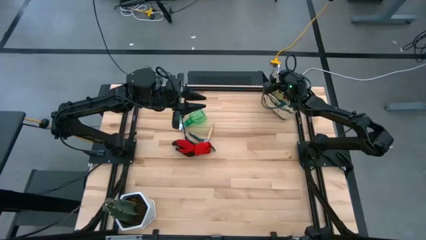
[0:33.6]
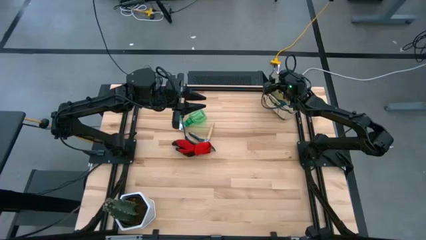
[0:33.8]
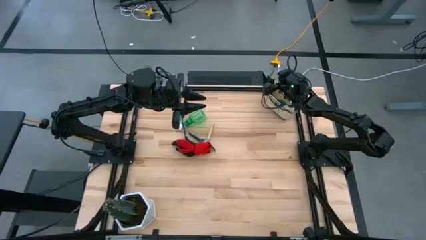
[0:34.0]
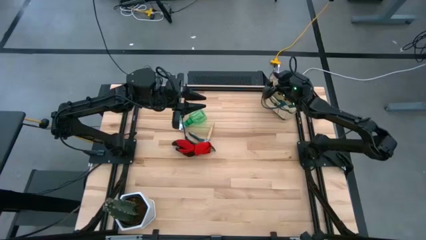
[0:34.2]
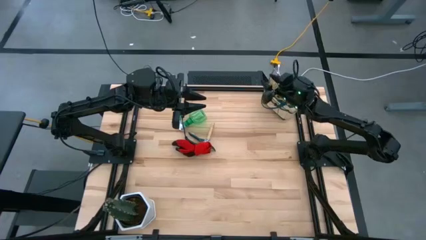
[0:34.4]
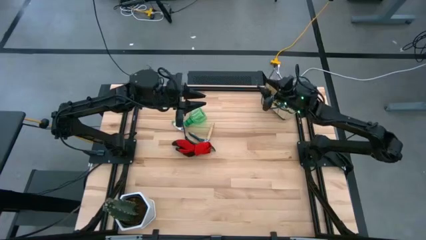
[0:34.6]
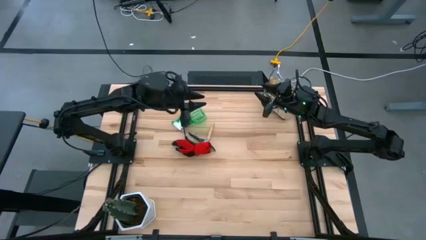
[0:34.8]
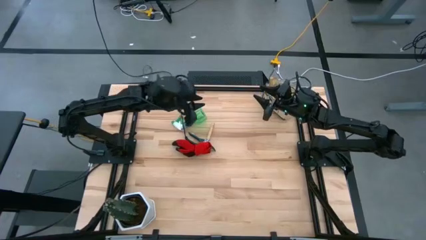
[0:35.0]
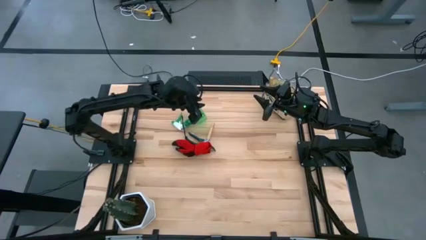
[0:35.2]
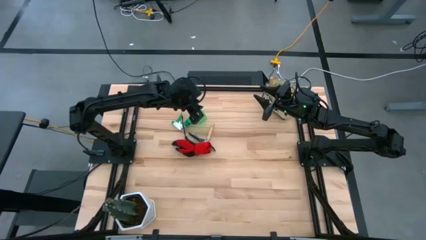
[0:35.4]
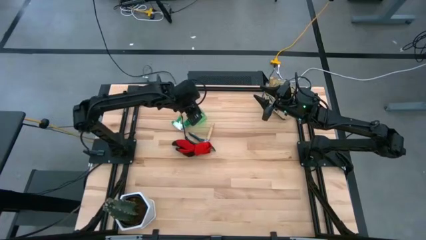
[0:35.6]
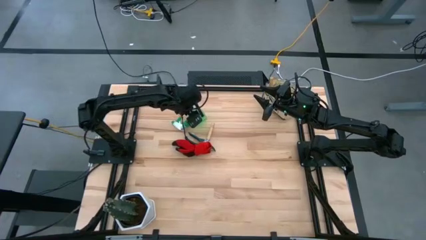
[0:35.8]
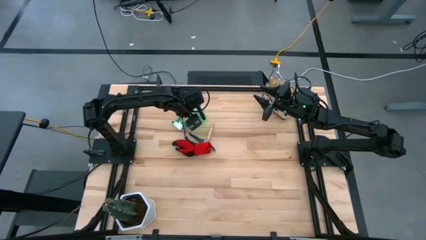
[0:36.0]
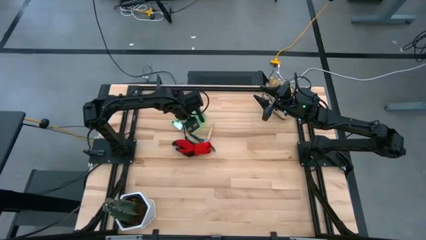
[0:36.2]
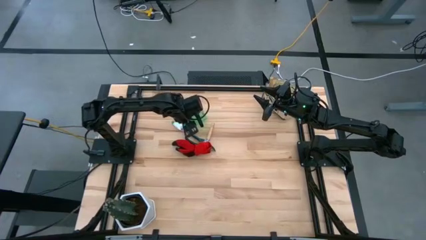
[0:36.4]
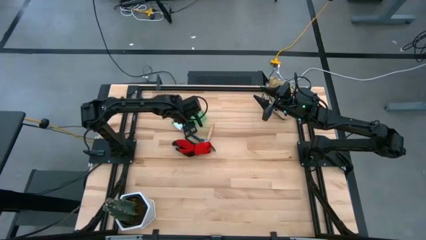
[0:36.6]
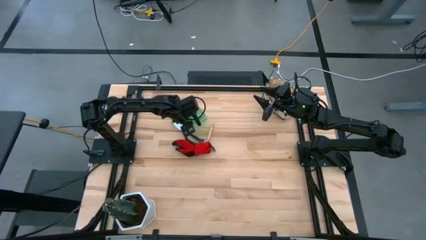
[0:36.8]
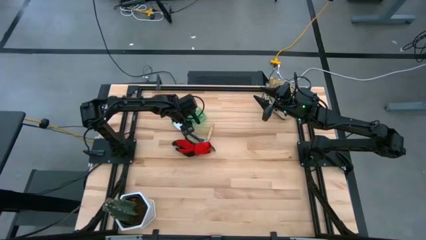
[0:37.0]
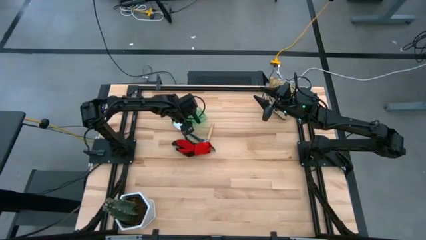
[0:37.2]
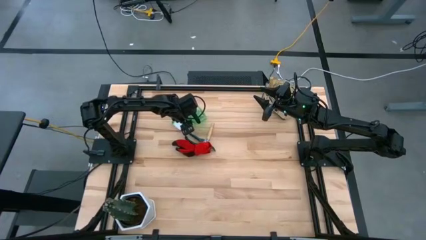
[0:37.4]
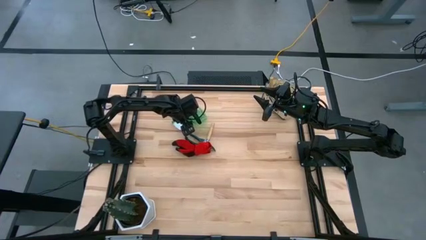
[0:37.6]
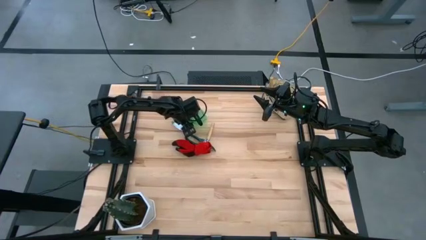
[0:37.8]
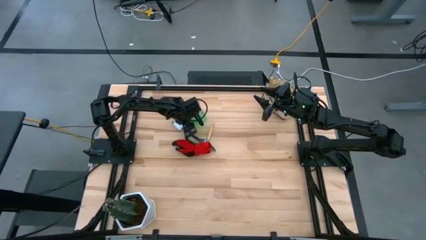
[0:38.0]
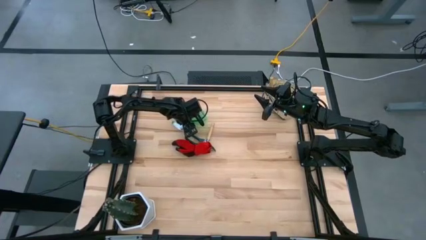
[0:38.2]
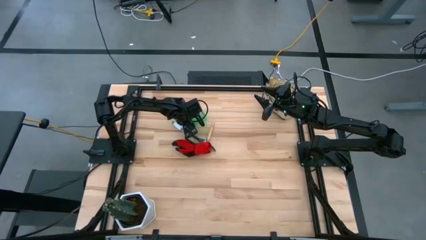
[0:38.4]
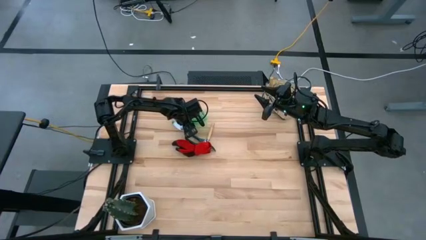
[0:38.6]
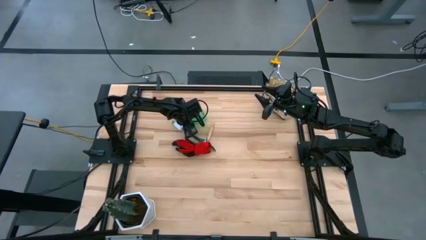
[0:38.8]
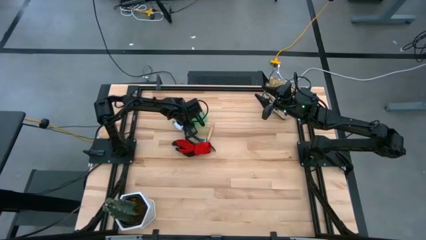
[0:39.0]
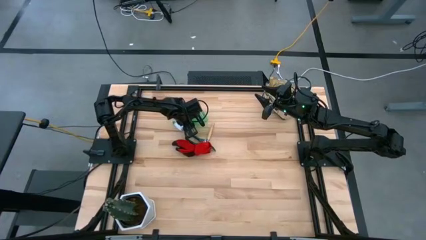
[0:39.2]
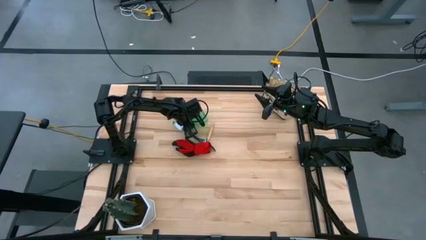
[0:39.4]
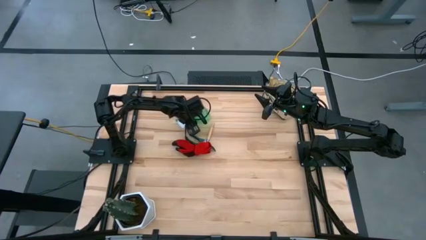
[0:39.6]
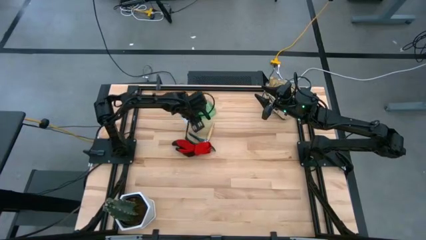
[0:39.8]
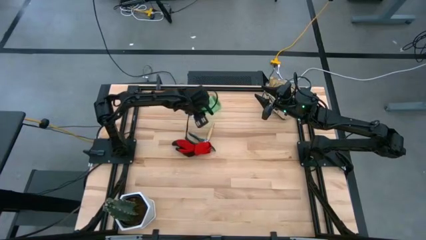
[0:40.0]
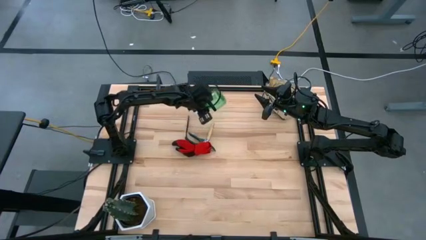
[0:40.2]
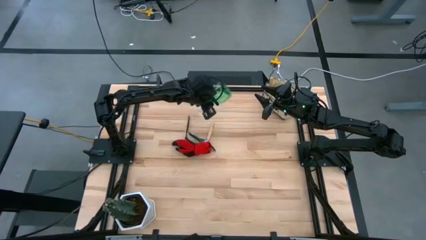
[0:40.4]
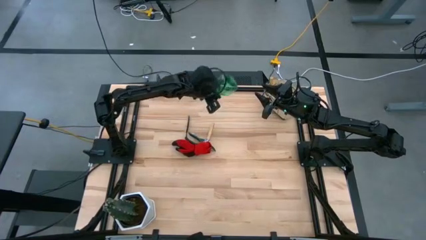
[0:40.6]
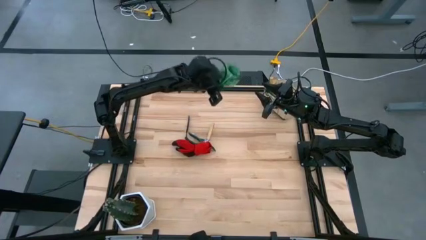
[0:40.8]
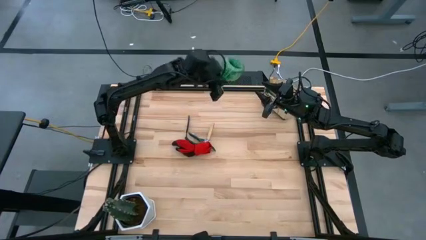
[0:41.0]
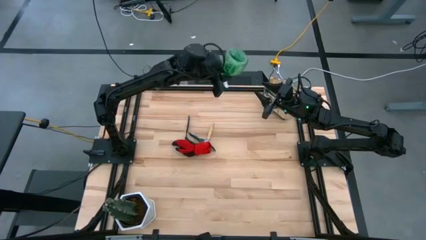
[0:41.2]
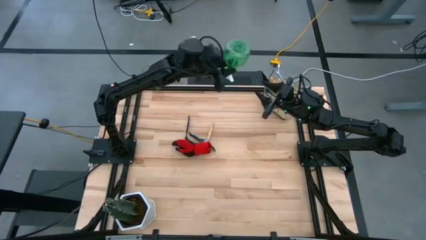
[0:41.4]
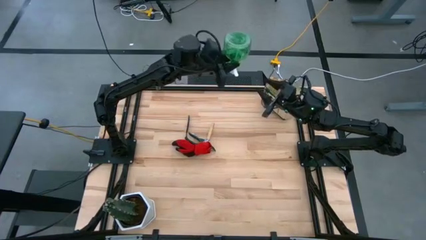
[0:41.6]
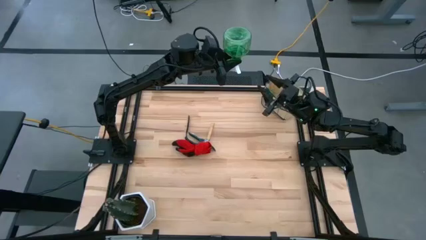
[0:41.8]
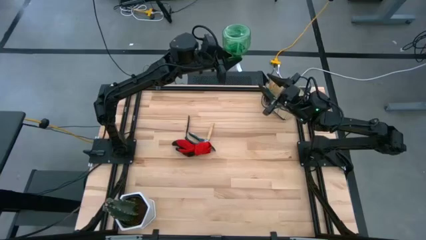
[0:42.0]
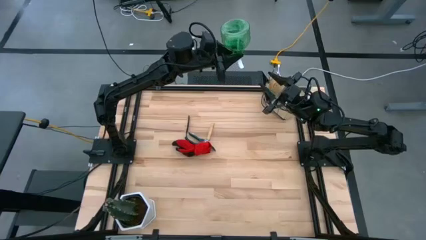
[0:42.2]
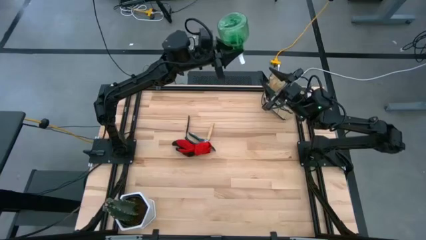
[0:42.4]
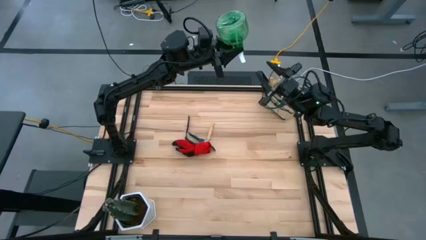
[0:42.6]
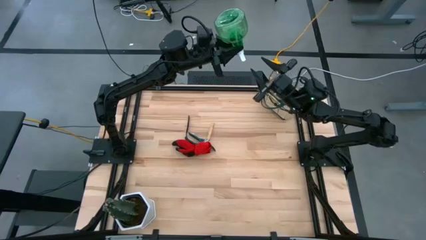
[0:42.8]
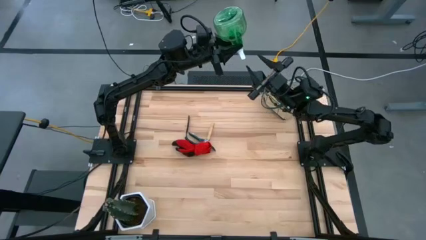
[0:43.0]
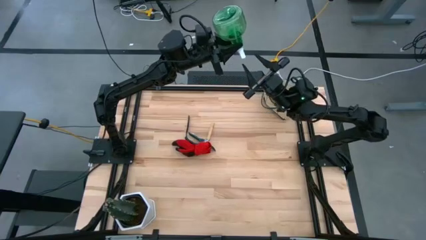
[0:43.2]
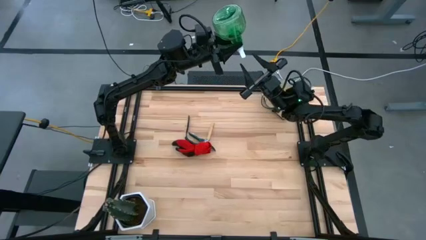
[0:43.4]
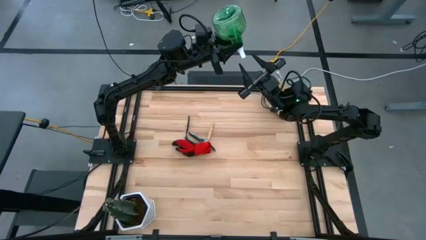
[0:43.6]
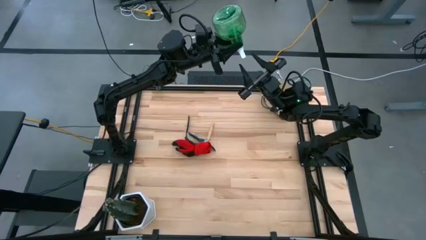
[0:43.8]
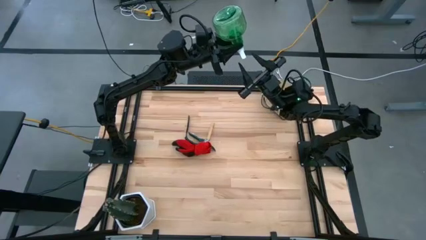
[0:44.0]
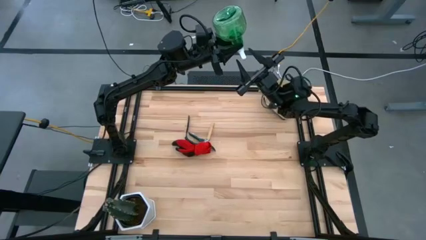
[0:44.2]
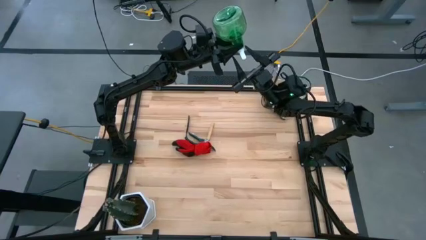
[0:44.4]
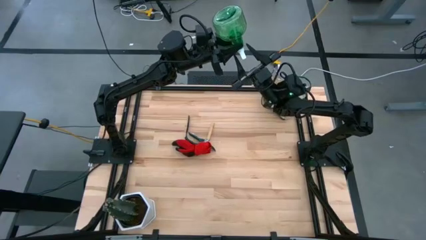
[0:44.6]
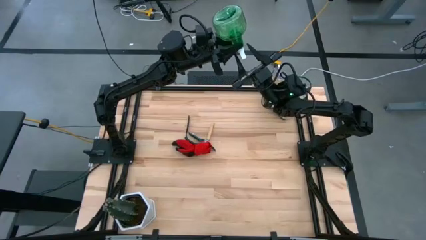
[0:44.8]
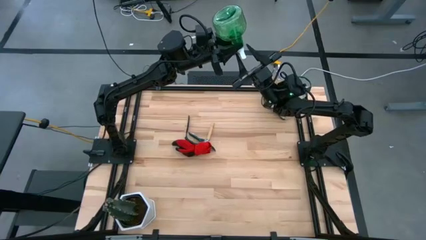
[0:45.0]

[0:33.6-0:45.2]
Task: Pick & Place Garden tools in Gardening bag
Put the green spray bottle into the gardening bag
